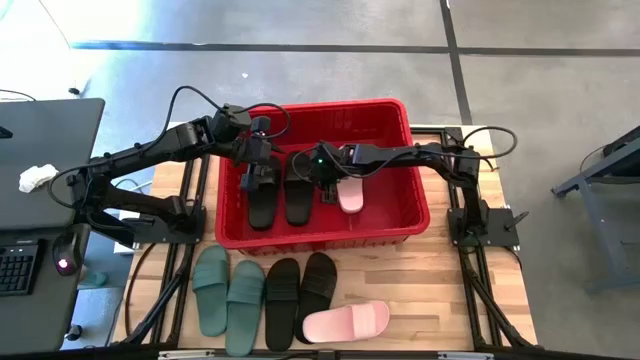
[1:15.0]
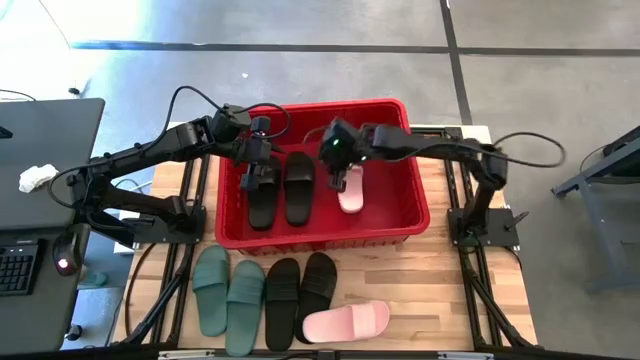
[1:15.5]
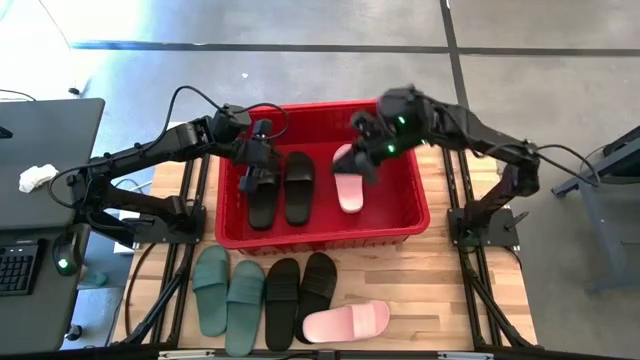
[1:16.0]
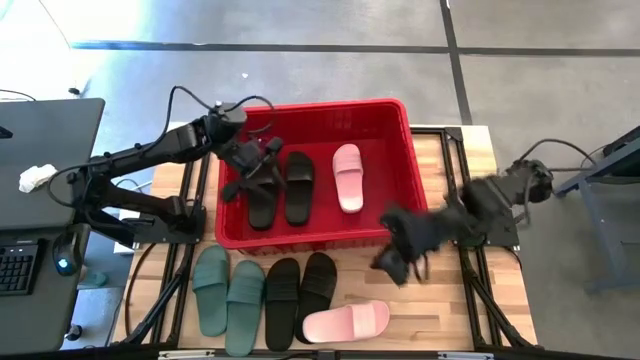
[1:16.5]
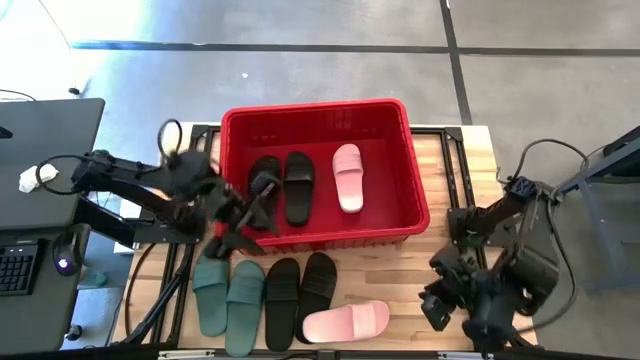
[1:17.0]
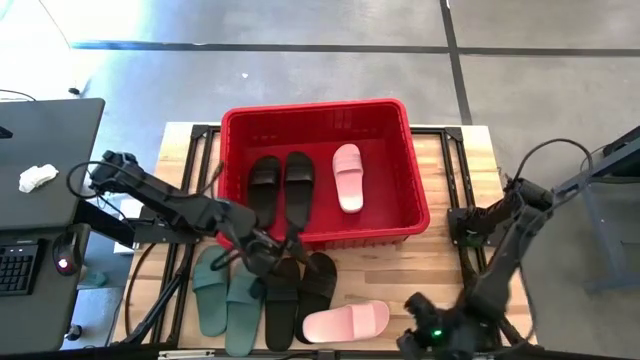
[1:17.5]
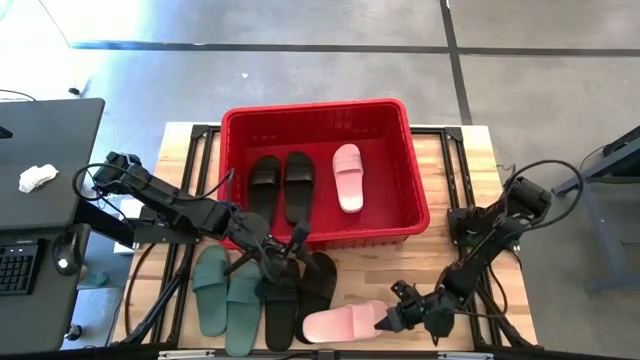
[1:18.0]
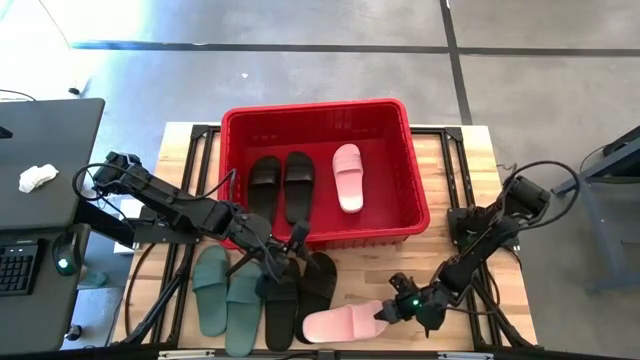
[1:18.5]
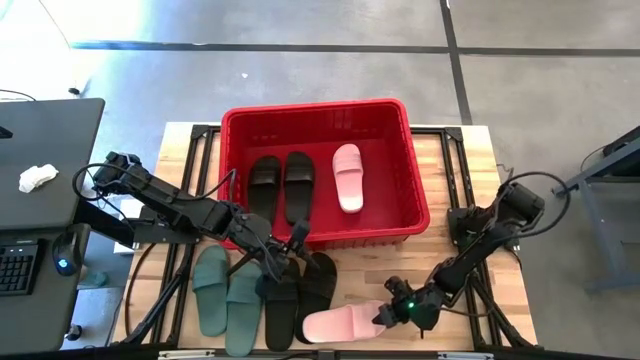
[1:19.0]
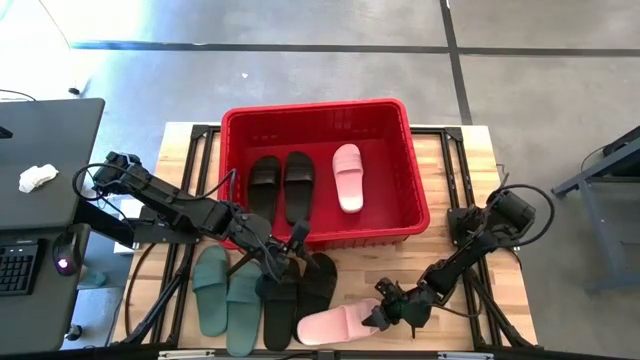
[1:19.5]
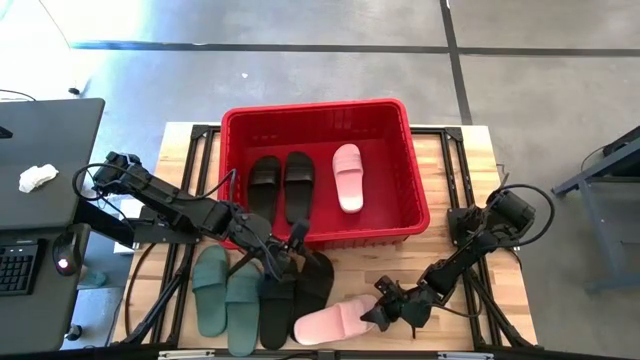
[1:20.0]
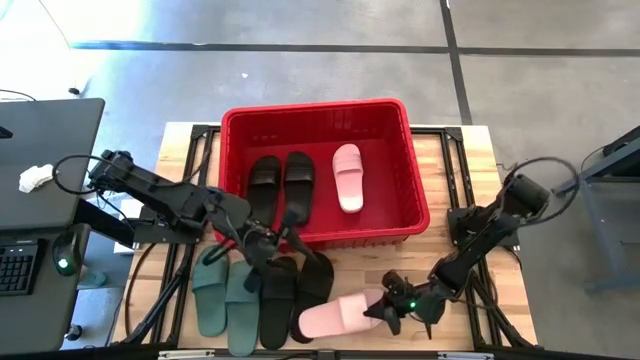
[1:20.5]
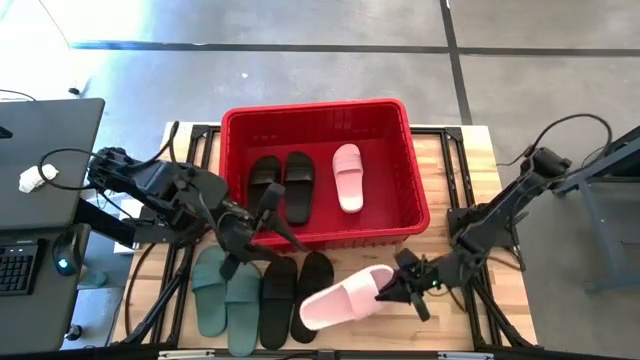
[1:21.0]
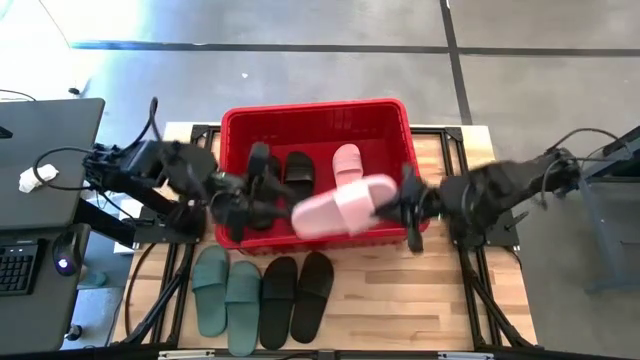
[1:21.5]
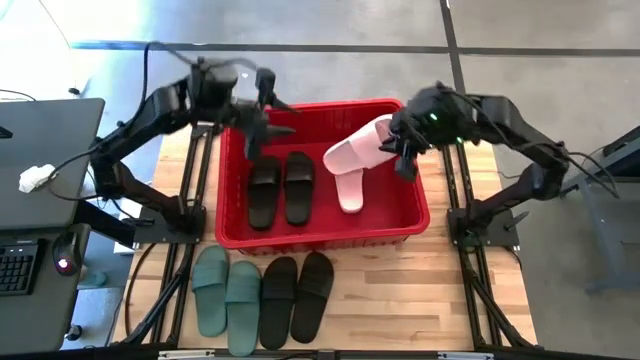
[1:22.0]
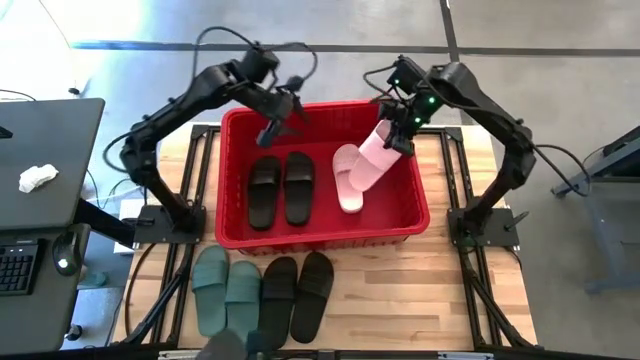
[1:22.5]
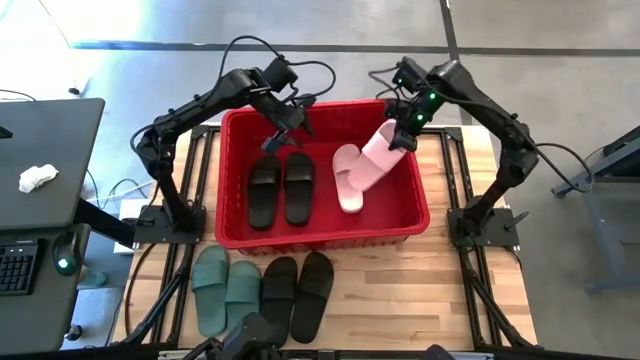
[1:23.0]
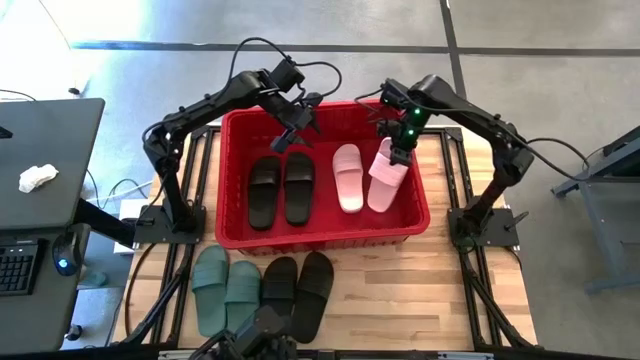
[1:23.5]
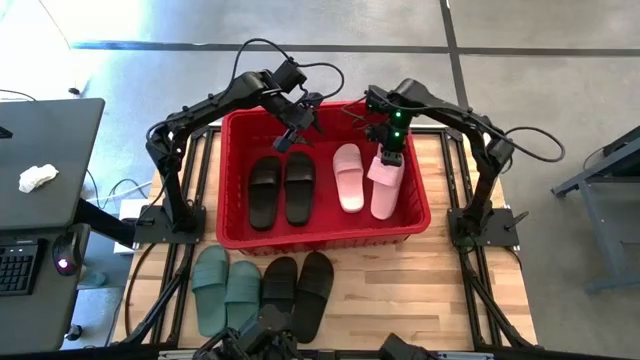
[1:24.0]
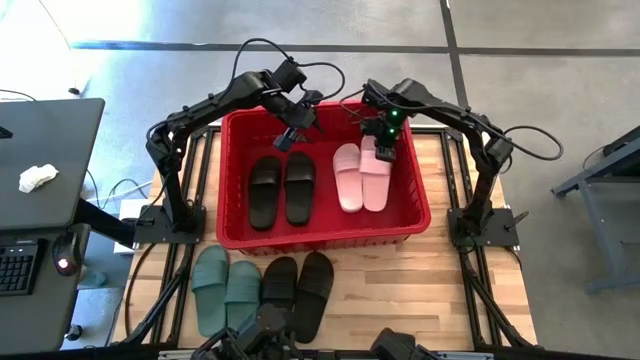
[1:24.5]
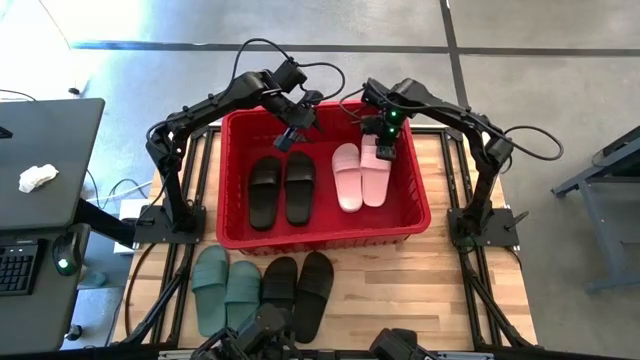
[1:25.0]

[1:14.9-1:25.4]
Task: Pick and place slides into bin
Put the pink slipper into the red bin

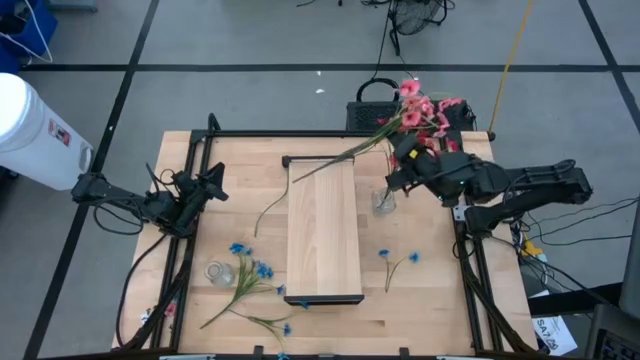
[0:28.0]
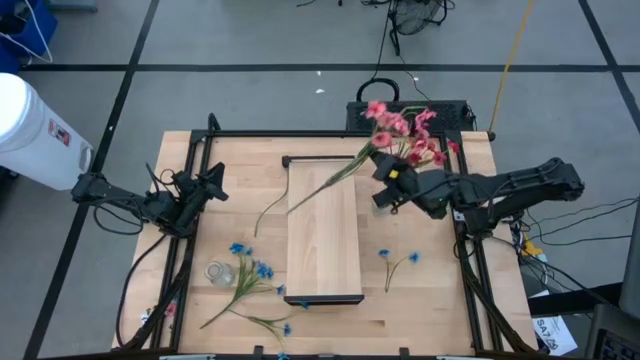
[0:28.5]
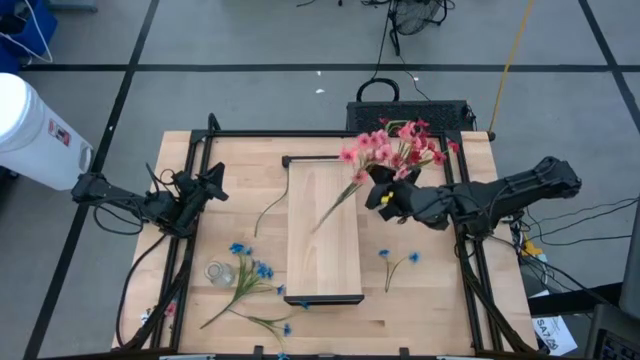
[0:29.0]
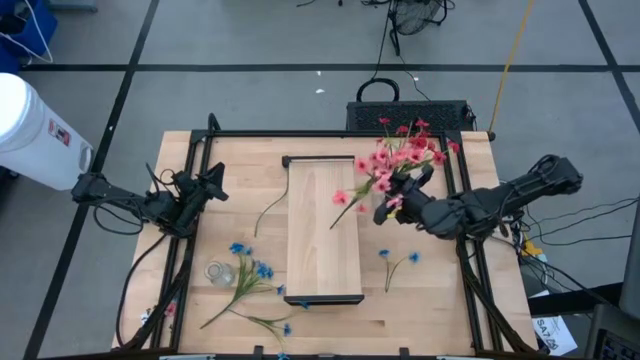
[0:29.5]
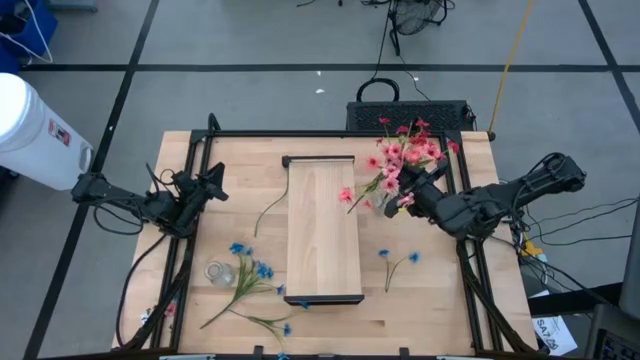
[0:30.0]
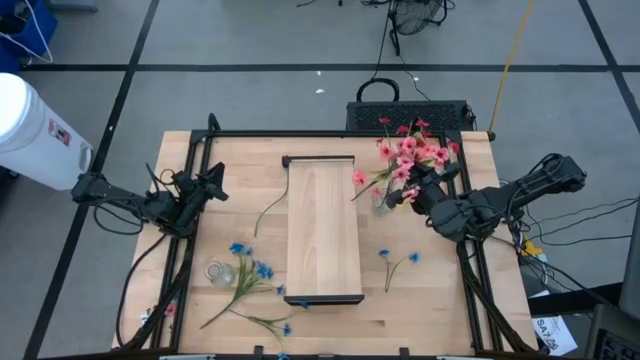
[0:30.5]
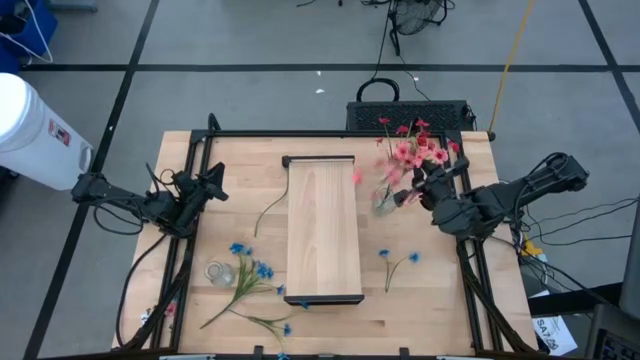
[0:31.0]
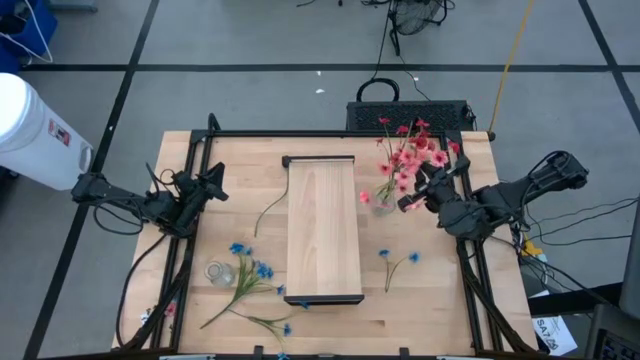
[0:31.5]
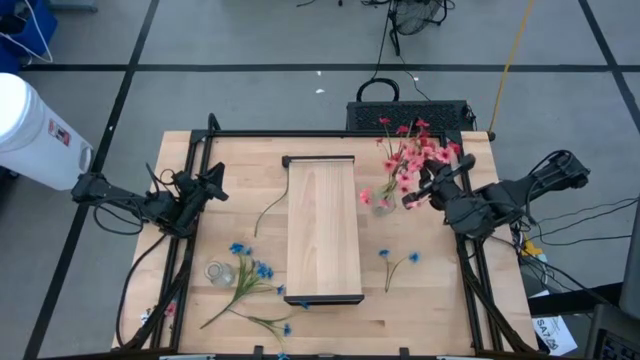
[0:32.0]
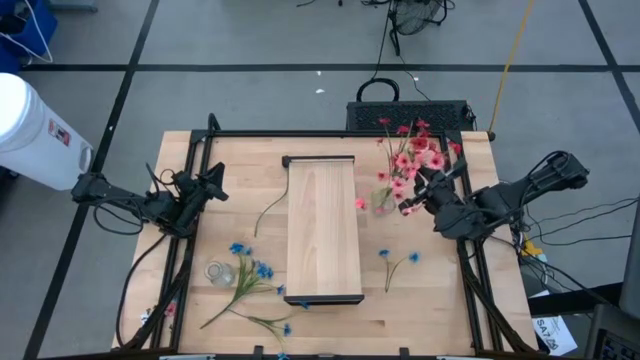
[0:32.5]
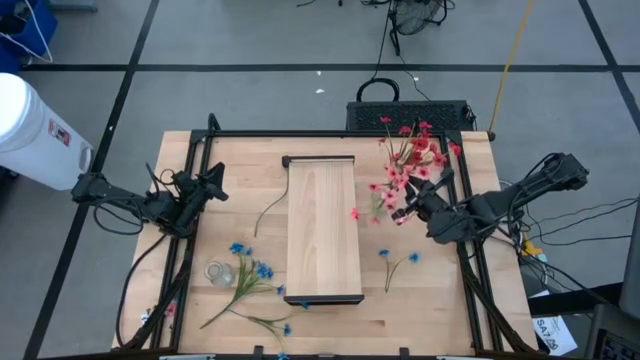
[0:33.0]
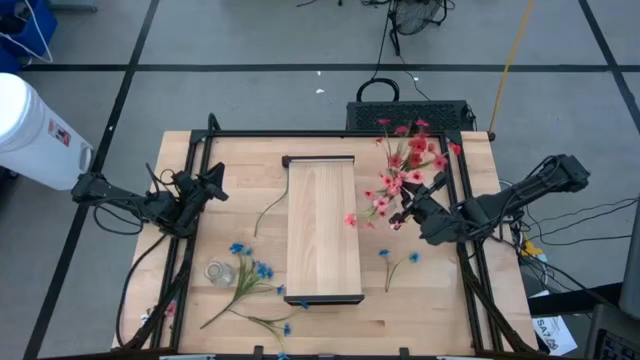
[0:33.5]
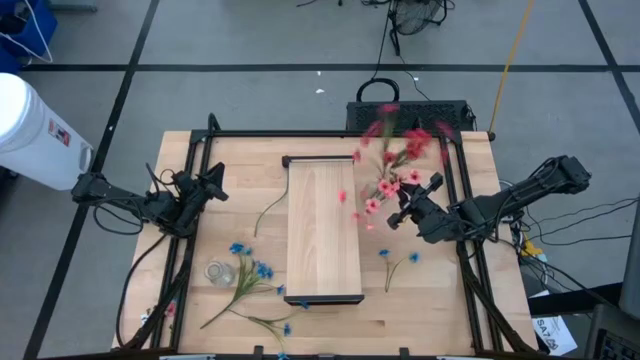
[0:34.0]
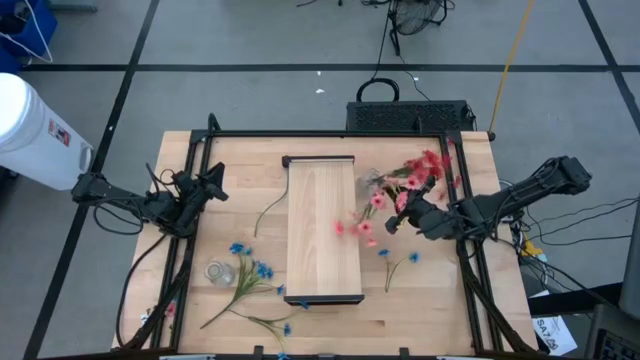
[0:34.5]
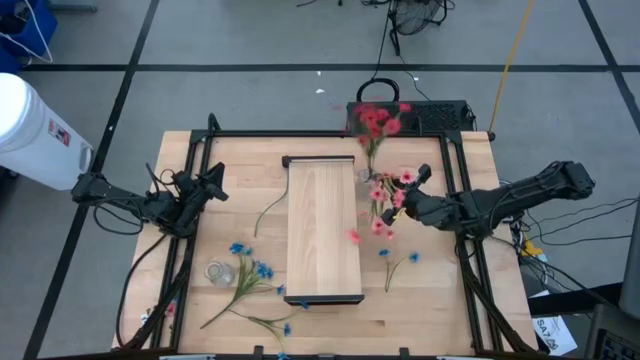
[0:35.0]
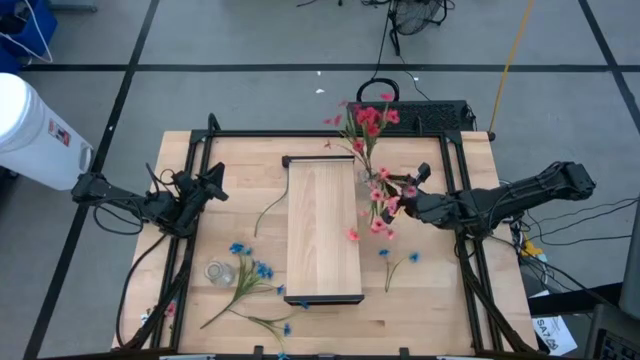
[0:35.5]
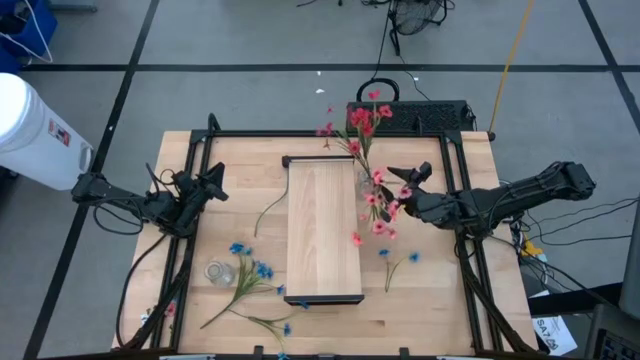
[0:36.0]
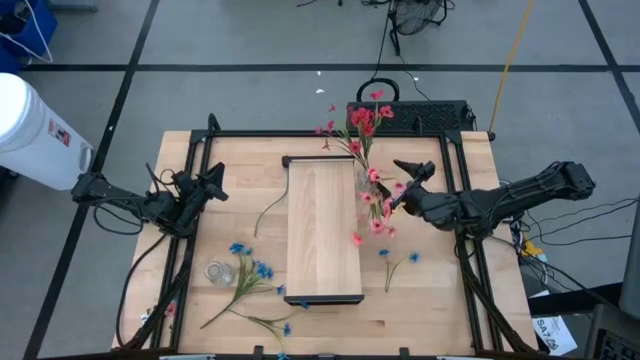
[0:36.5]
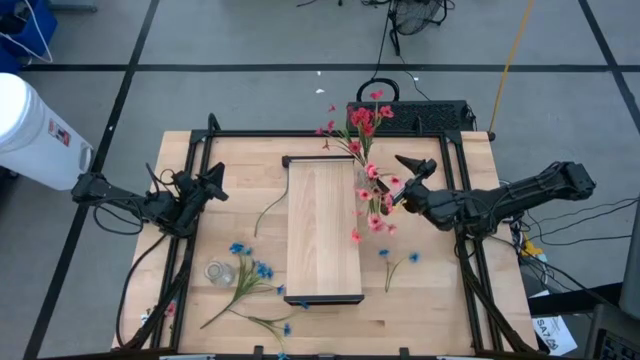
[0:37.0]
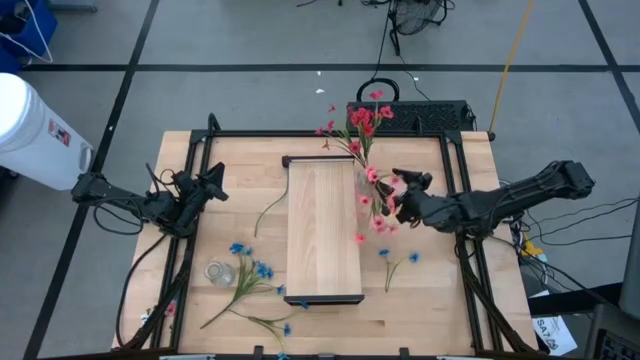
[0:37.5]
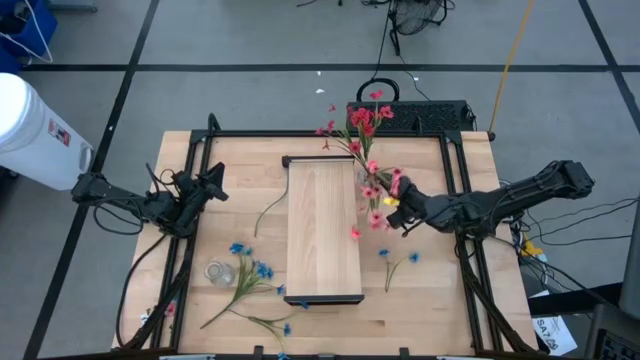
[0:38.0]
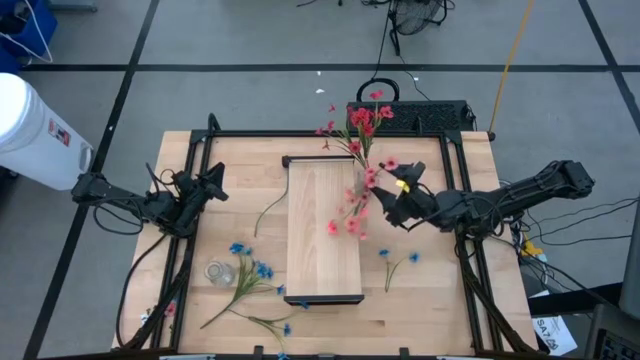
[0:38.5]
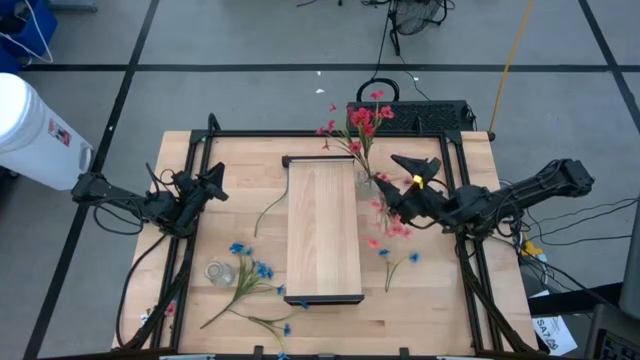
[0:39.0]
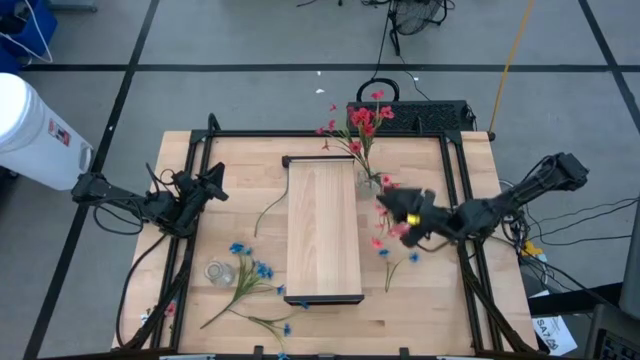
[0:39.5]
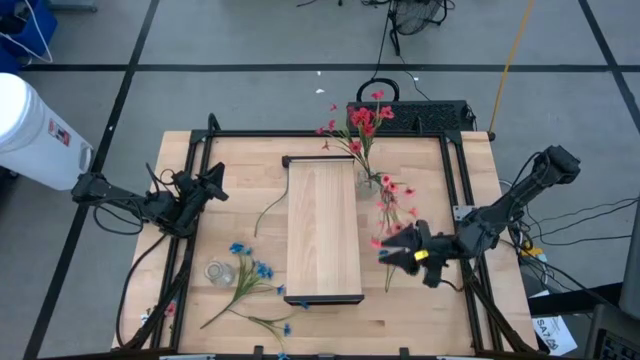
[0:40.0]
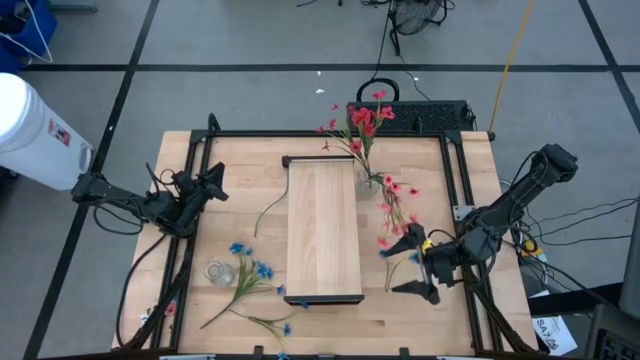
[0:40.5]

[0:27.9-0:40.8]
Task: Pick and place flowers into a vace then onto a shelf
Put the pink flowers into the right transparent vase
